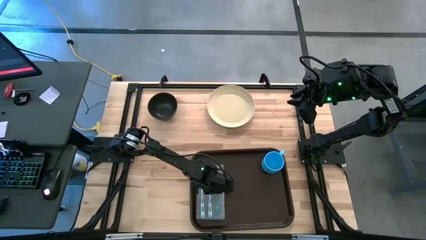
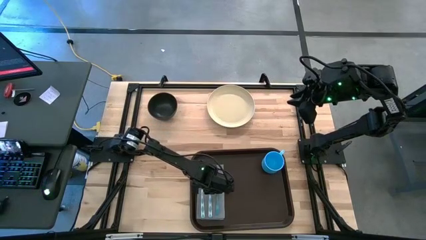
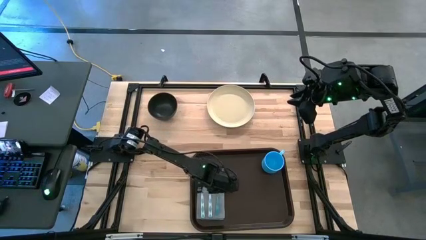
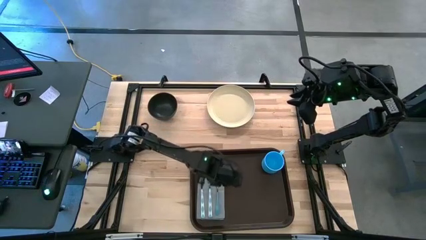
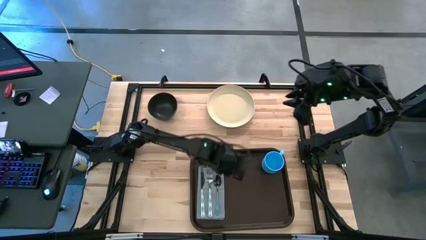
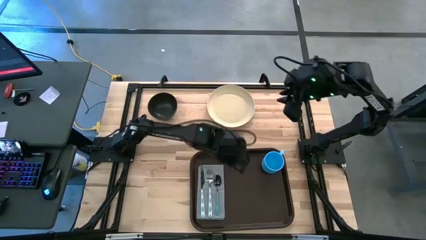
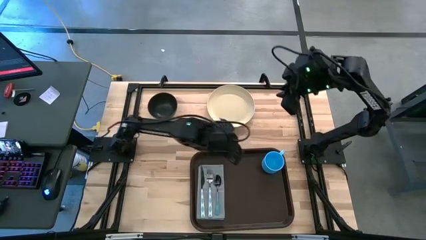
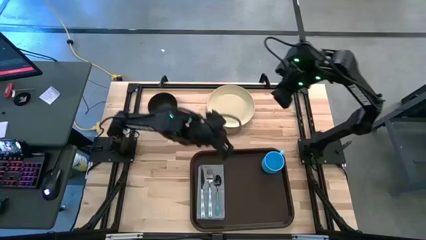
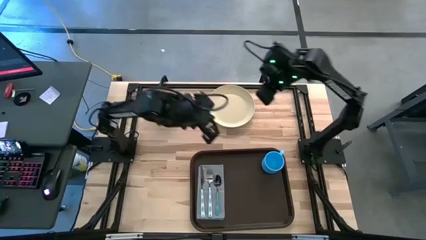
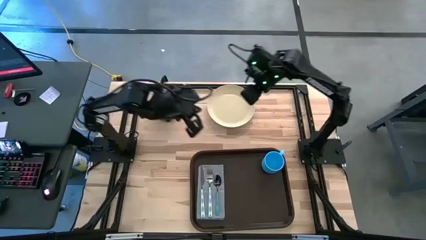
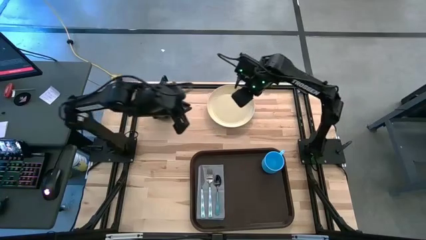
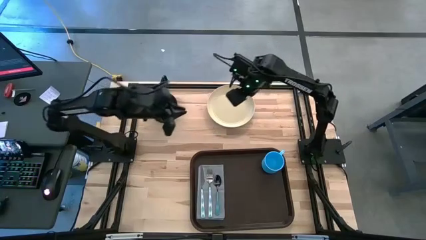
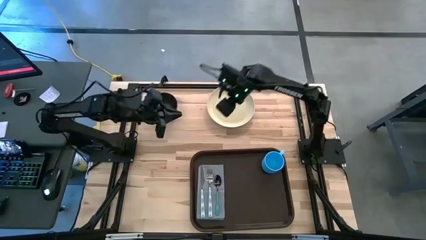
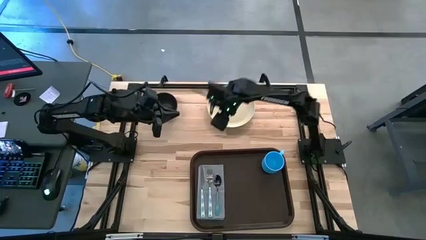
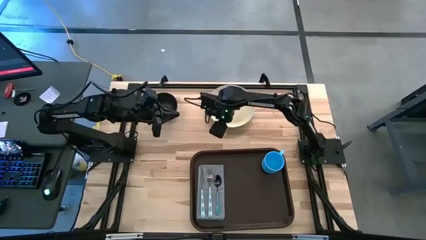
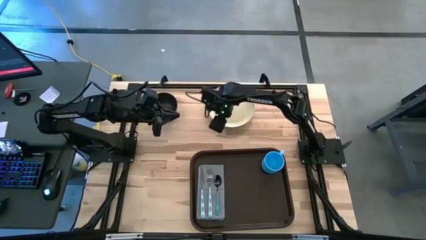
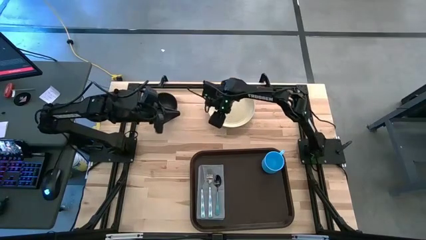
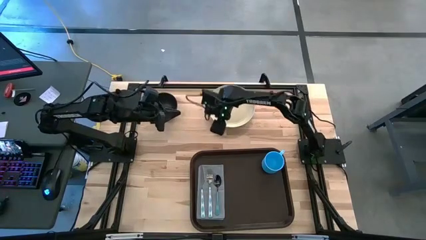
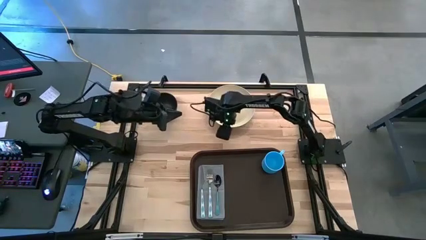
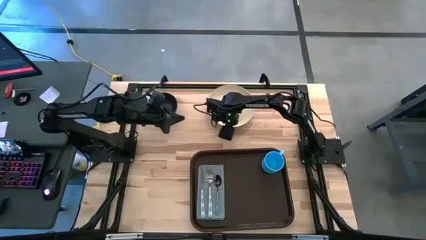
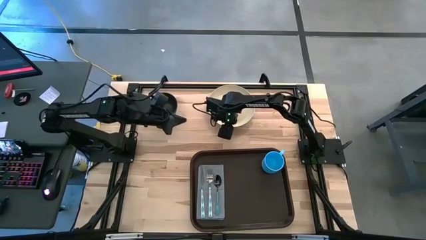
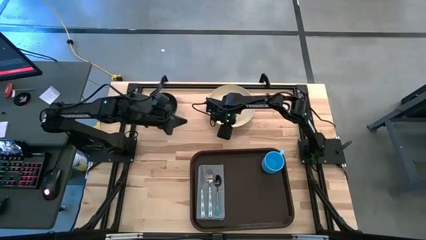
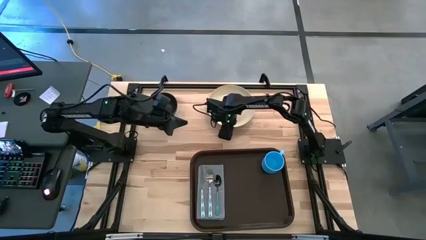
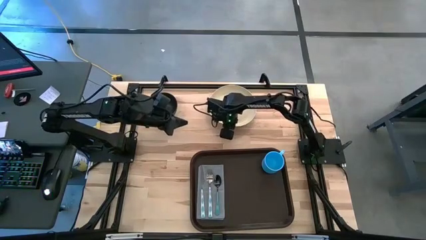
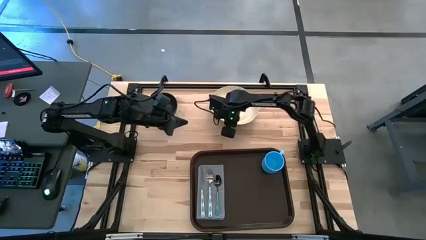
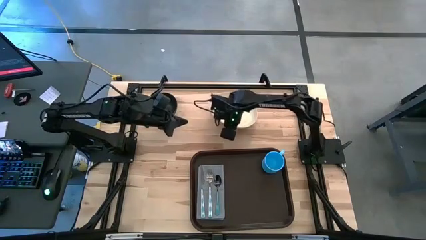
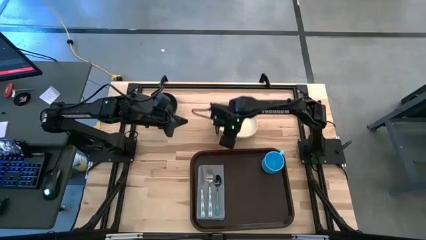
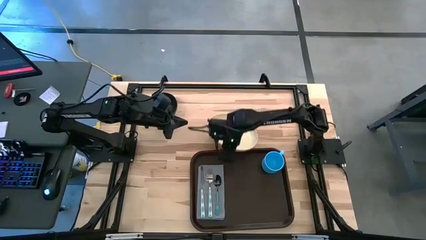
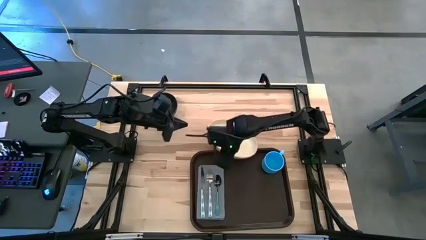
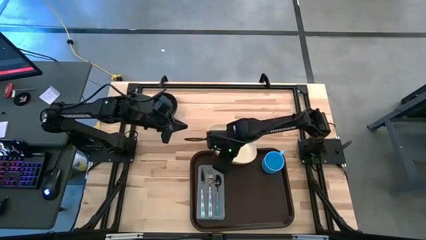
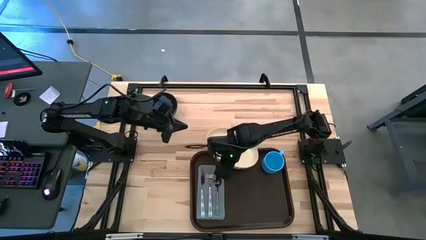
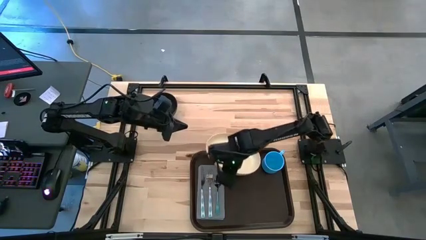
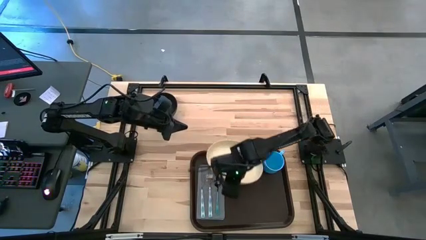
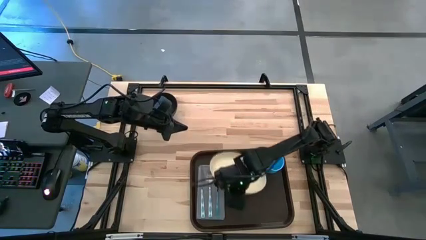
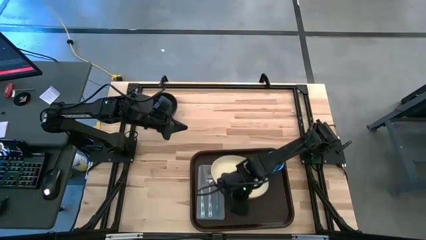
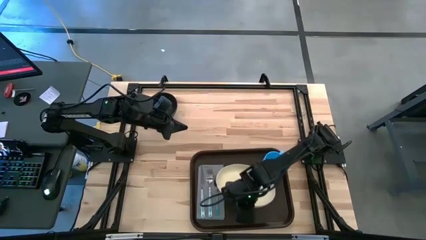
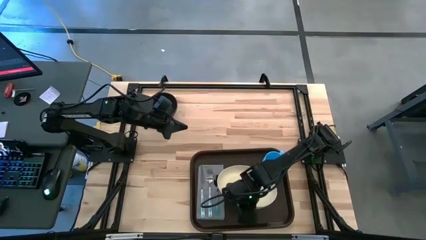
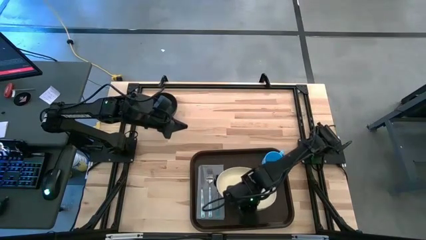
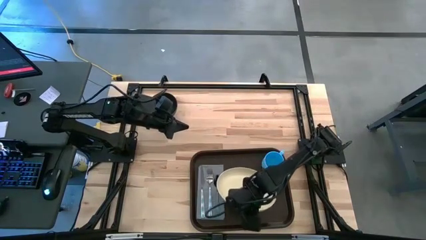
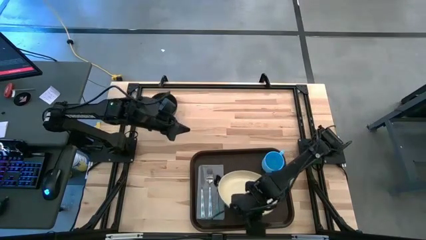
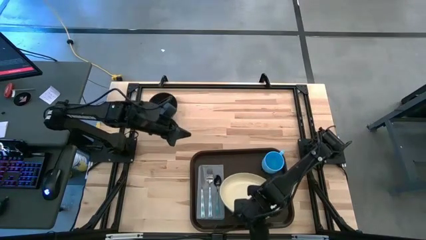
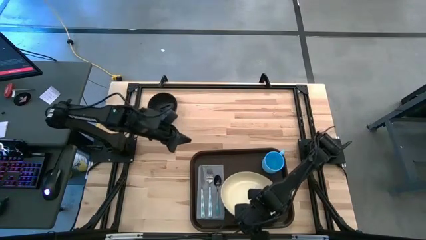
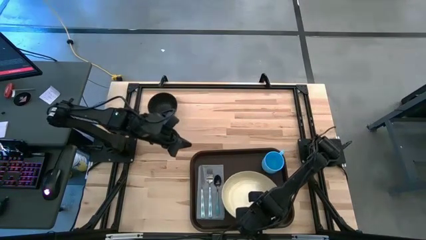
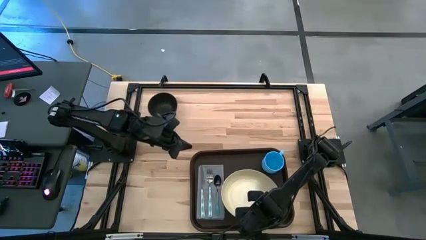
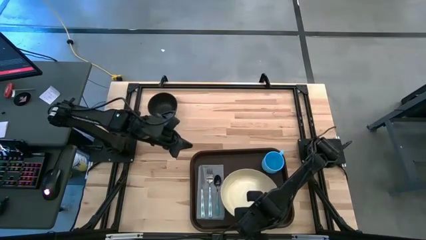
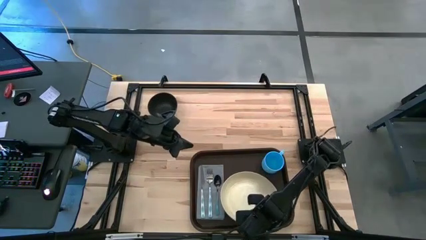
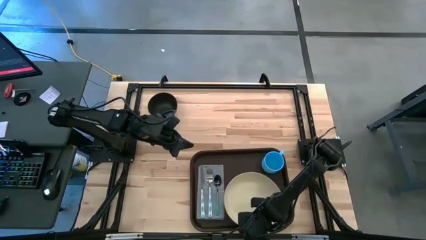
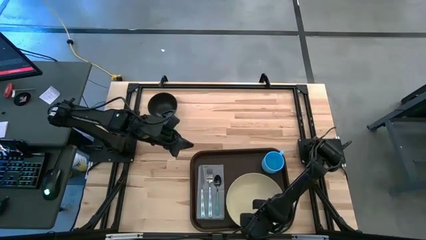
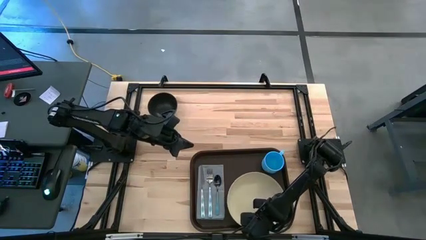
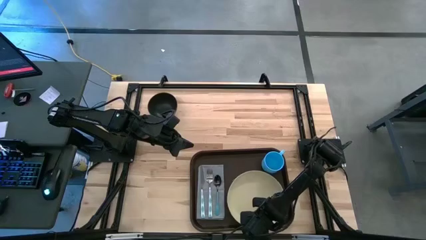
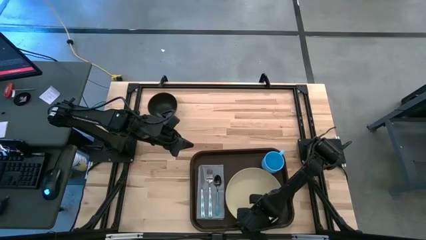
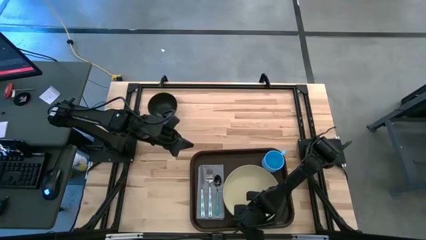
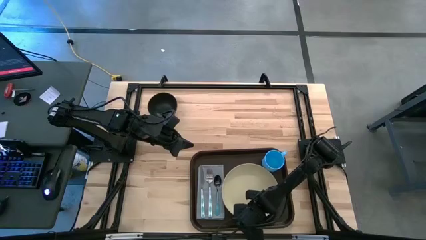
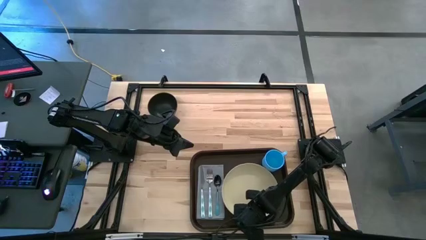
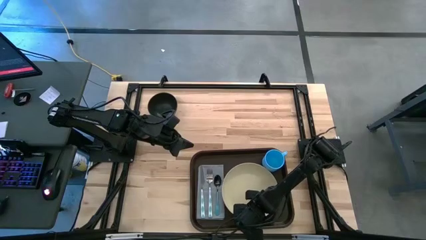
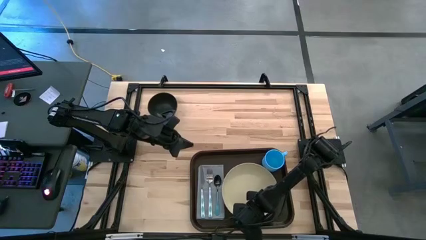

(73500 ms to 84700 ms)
Task: Set up tray
Put the white plate on the brown tray to the right side of the blue spoon
